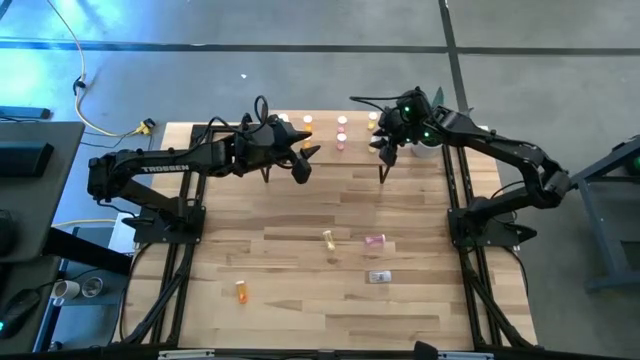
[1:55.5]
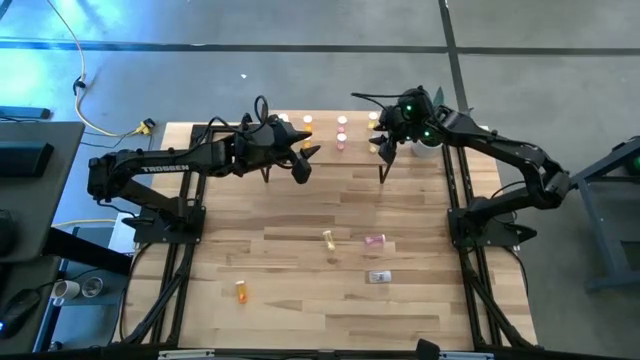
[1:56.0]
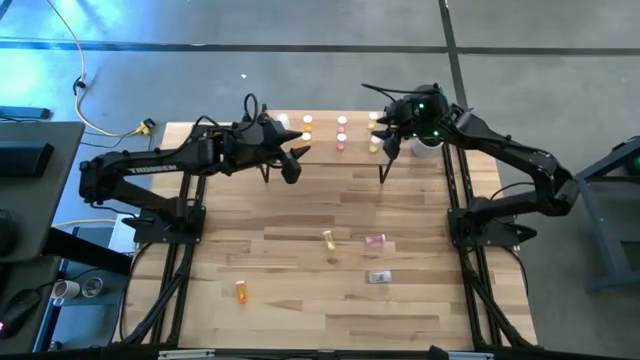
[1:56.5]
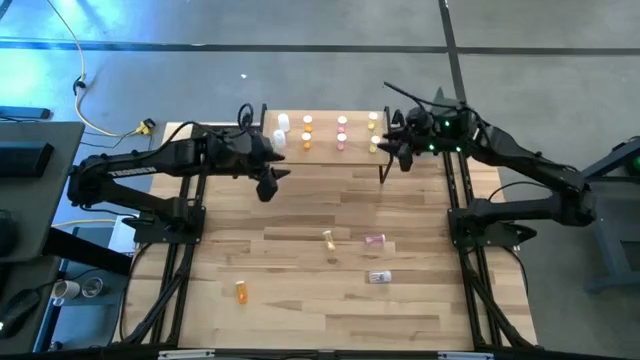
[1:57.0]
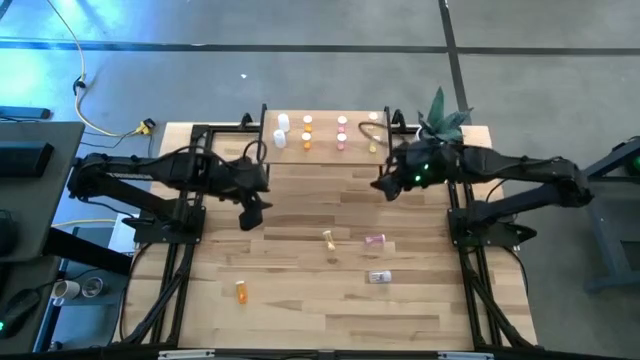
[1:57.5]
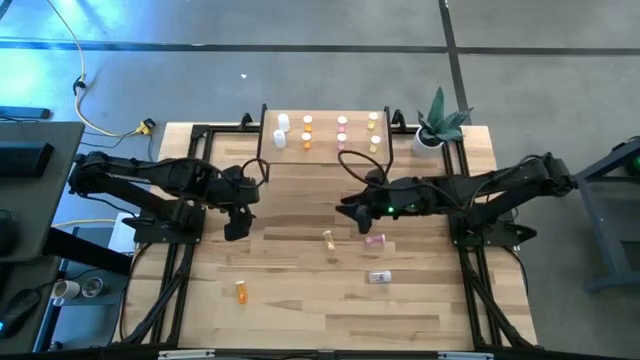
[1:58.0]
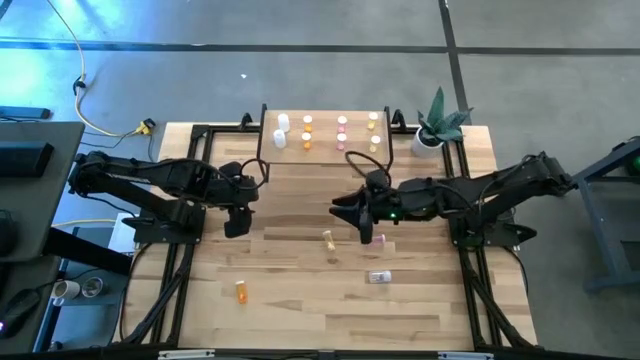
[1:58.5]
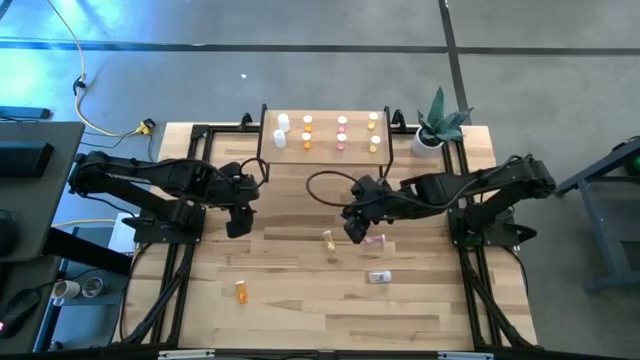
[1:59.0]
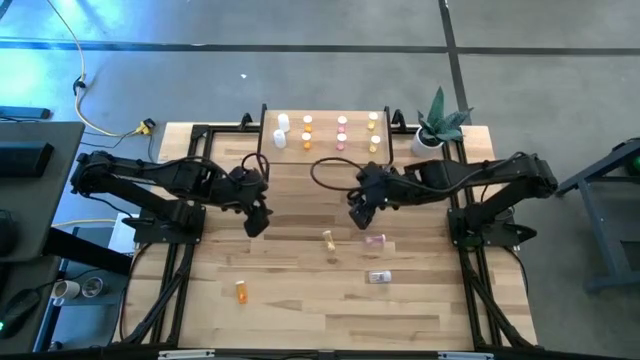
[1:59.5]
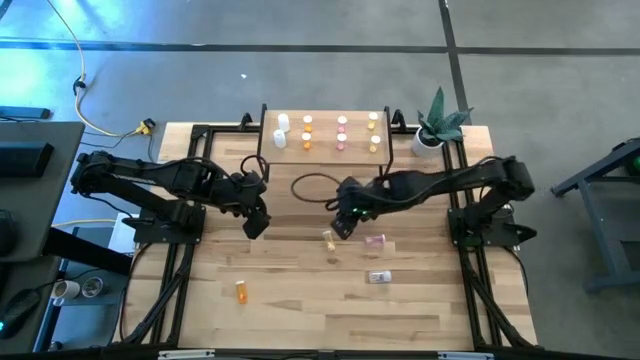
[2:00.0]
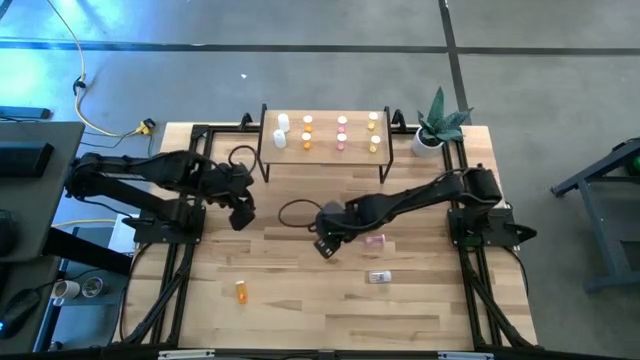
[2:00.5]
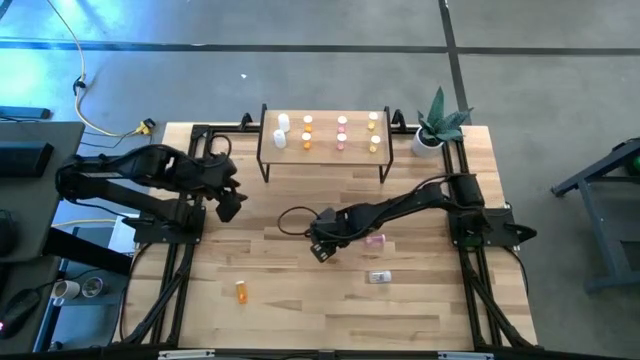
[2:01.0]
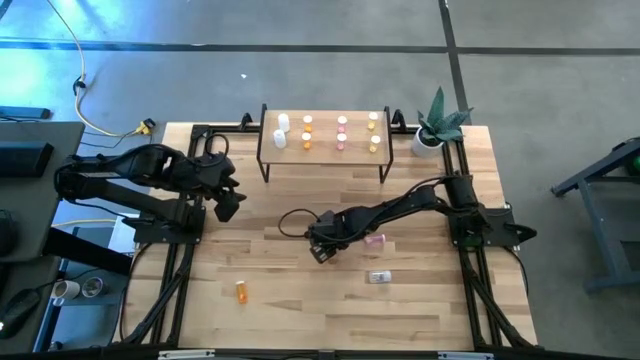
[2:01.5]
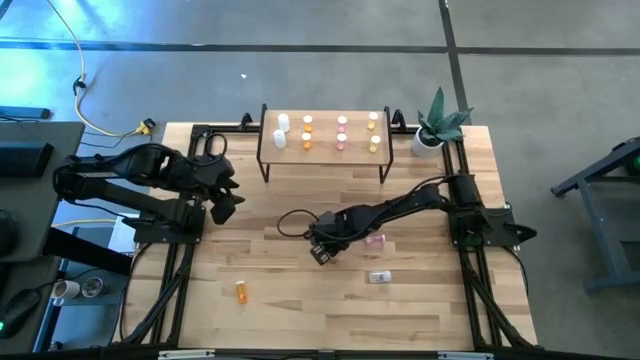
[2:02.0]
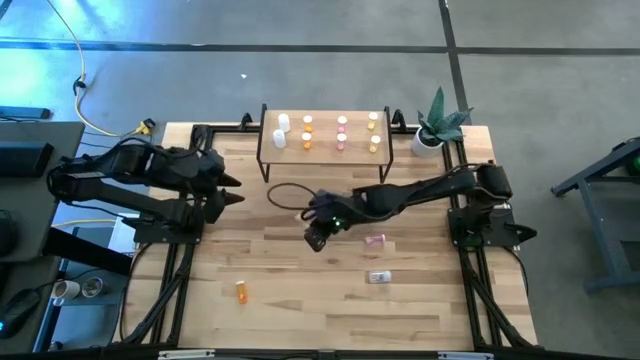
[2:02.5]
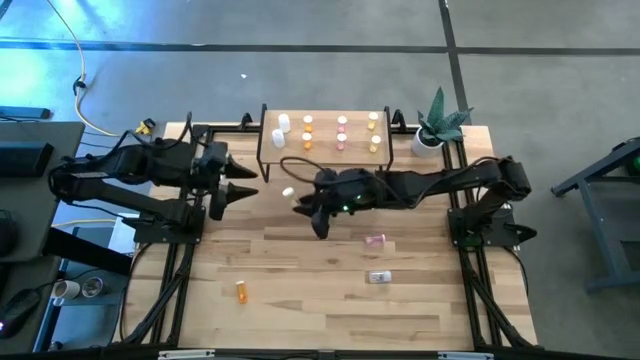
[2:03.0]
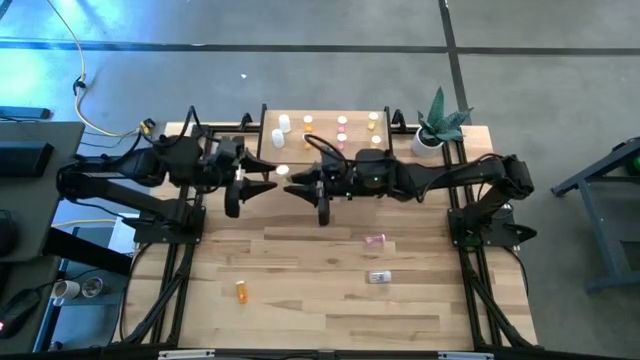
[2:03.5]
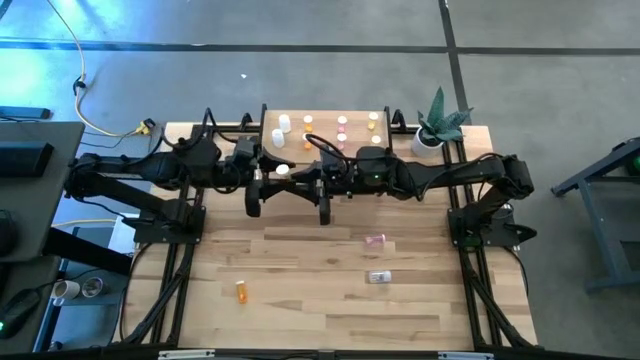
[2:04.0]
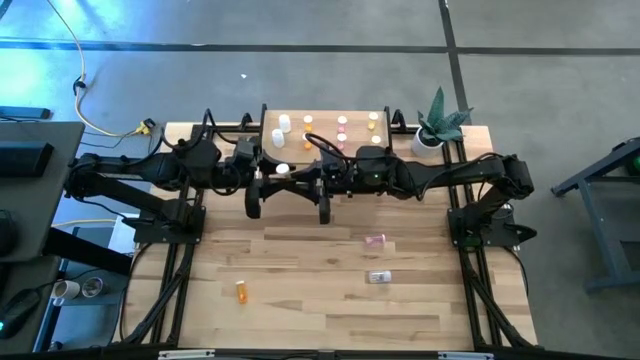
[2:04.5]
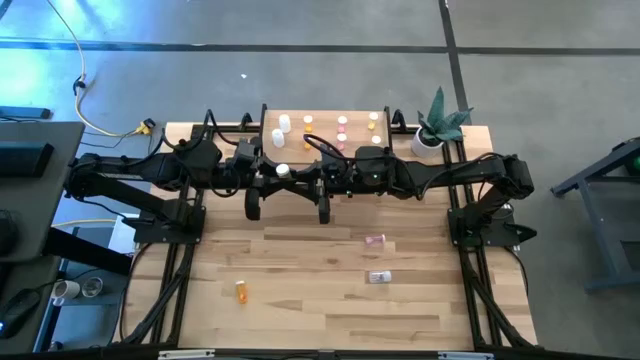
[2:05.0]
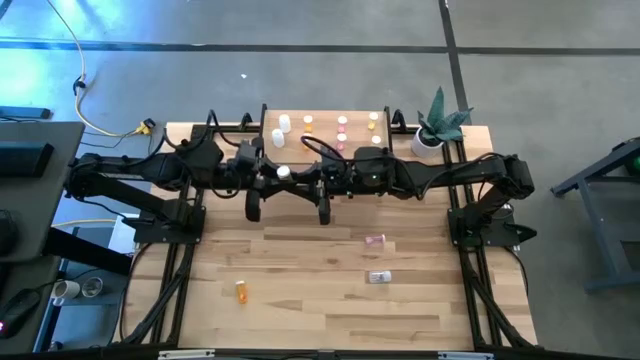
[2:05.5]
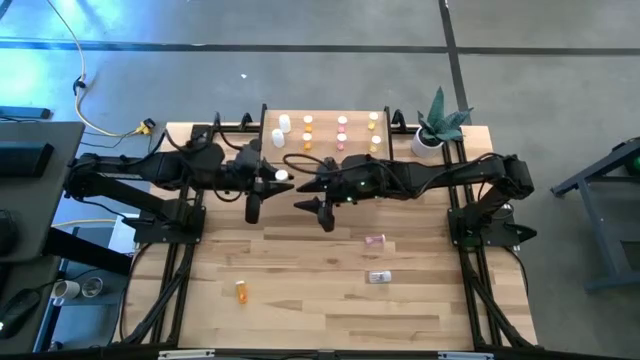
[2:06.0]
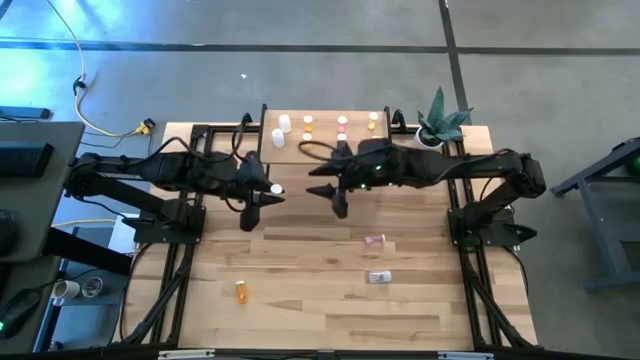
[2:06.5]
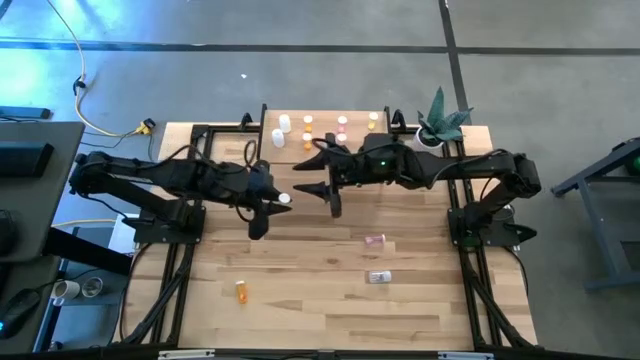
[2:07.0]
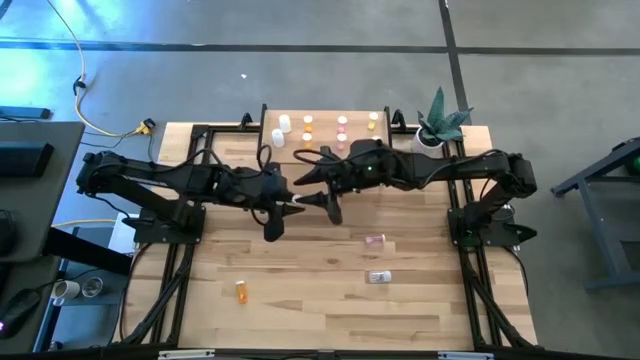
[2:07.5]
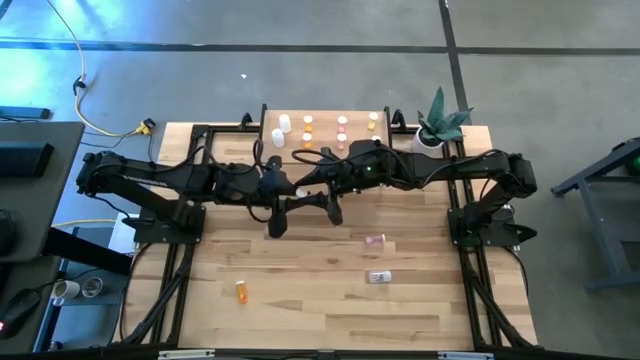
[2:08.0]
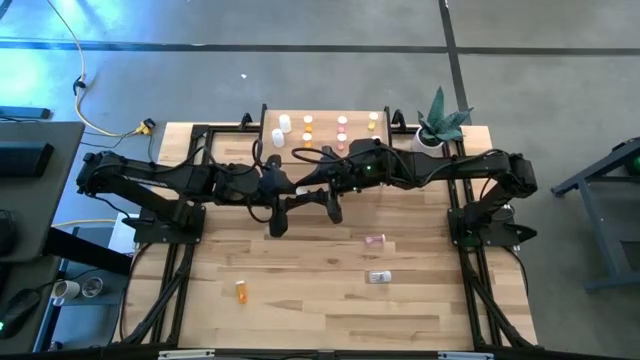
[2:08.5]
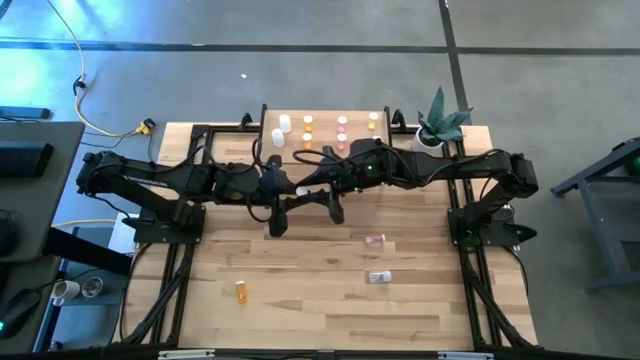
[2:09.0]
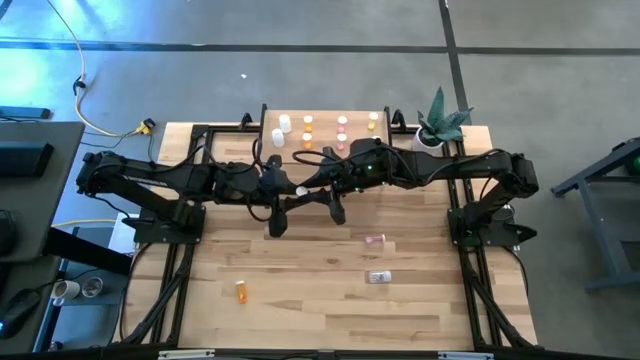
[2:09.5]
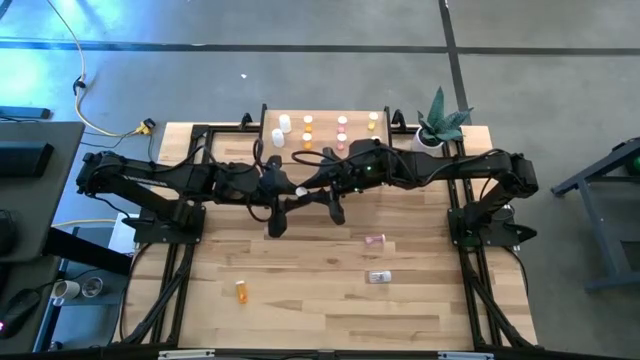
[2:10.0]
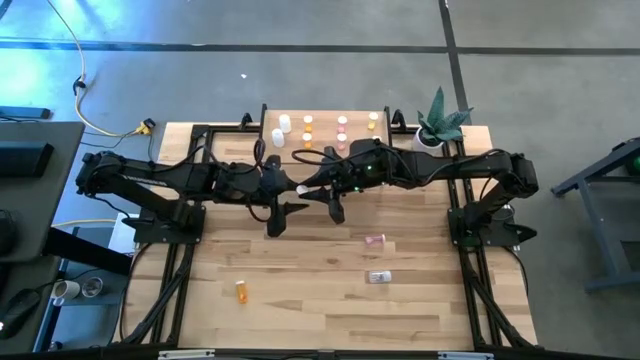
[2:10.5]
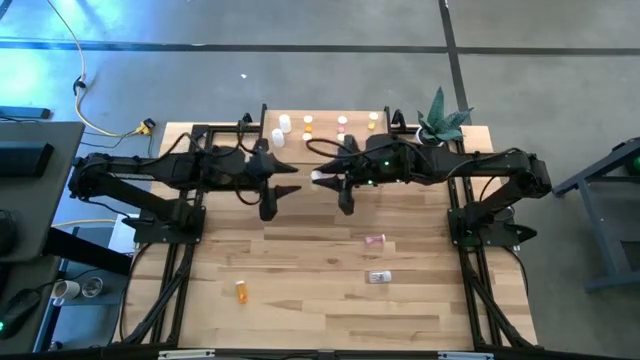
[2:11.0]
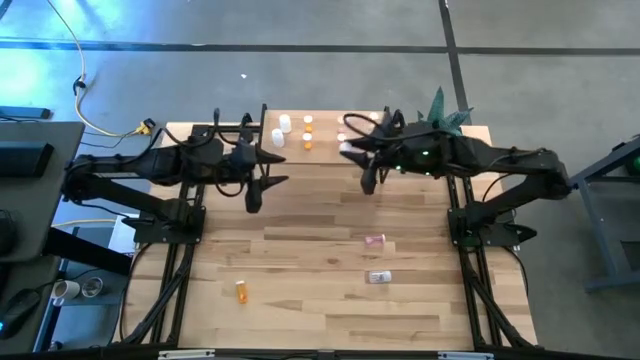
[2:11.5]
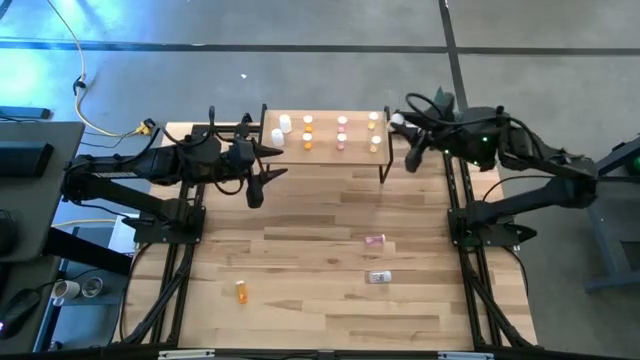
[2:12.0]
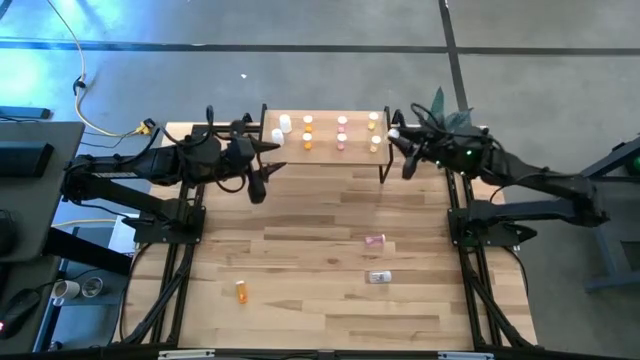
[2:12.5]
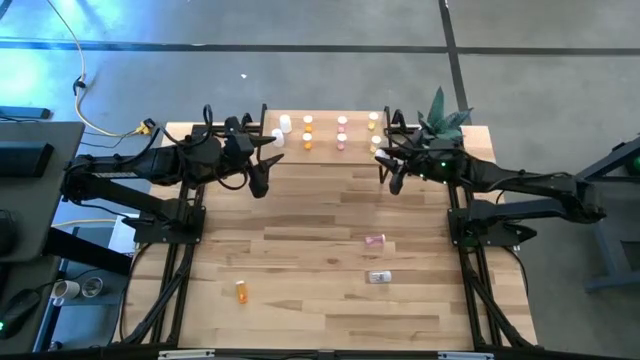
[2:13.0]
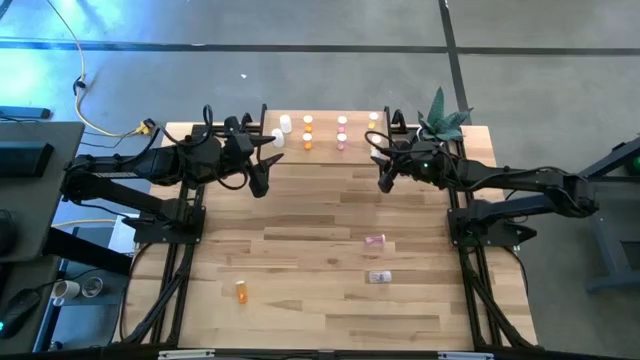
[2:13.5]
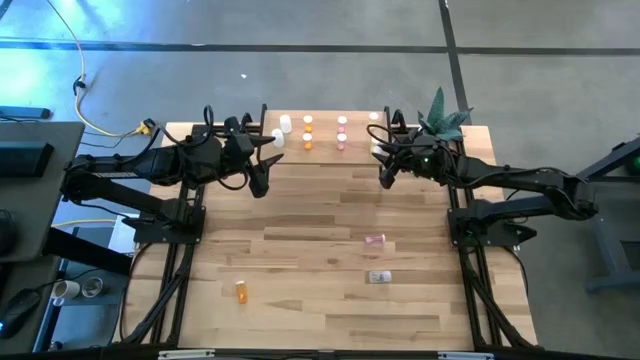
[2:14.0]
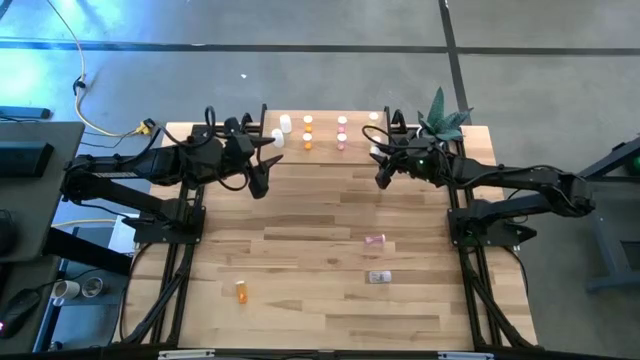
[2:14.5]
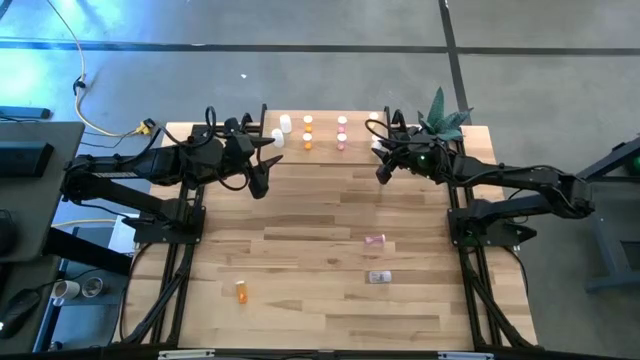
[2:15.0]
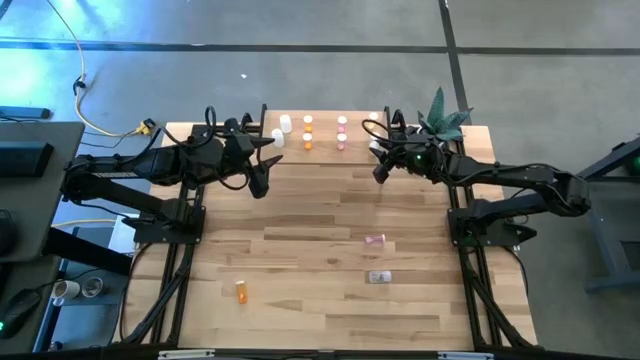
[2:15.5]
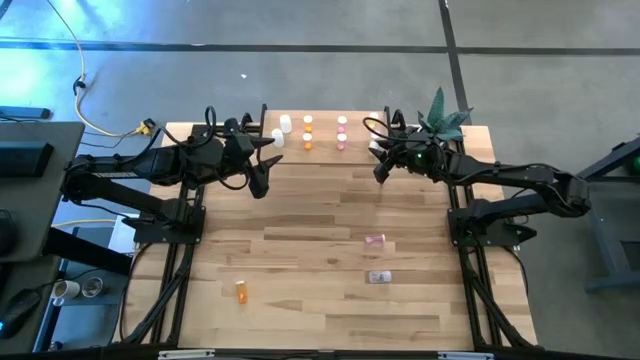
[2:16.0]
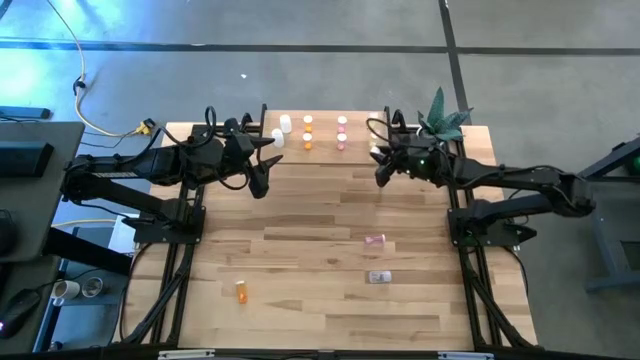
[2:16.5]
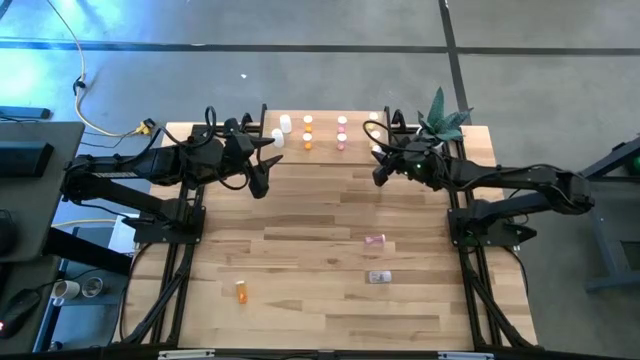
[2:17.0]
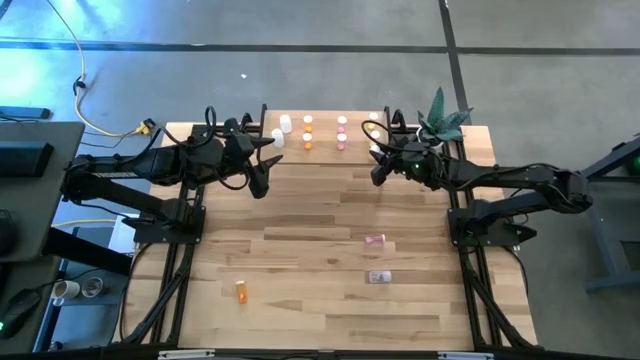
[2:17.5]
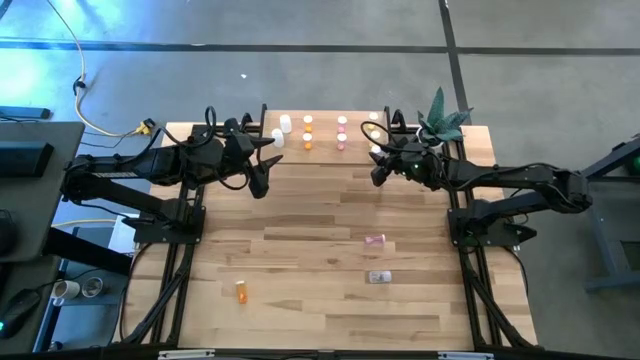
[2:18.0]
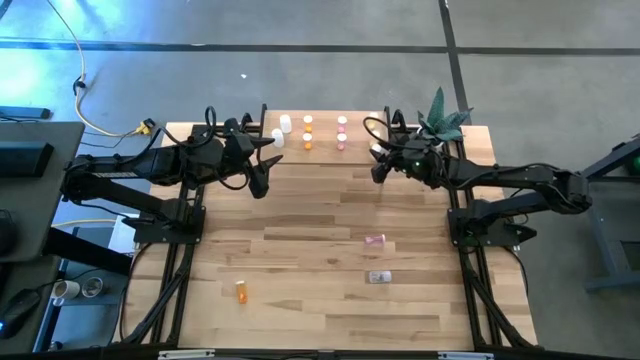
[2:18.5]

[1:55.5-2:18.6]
Task: Pick and place medicine bottles onto shelf by color
Put the yellow pill bottle aligned with the other yellow pill bottles on the shelf
